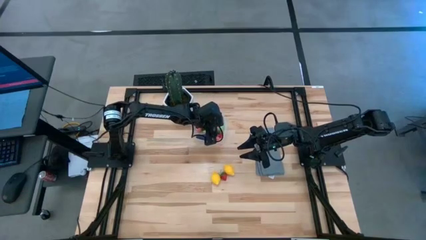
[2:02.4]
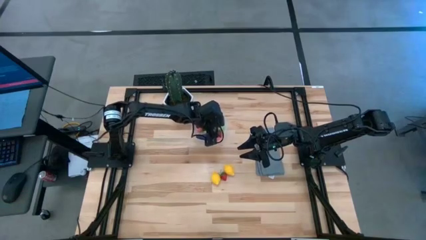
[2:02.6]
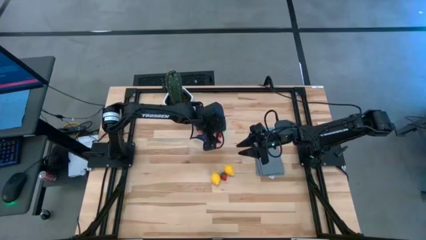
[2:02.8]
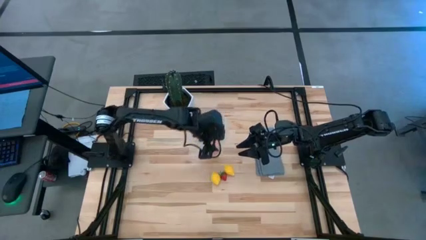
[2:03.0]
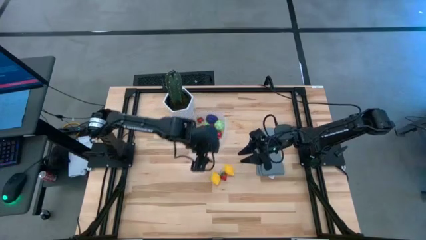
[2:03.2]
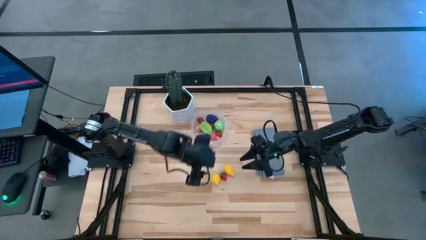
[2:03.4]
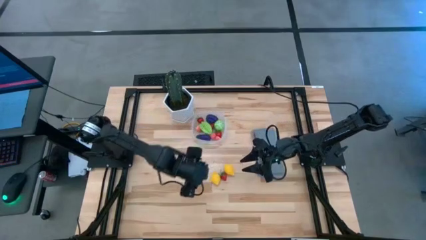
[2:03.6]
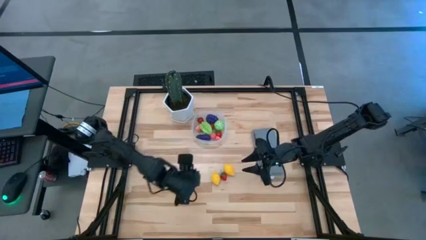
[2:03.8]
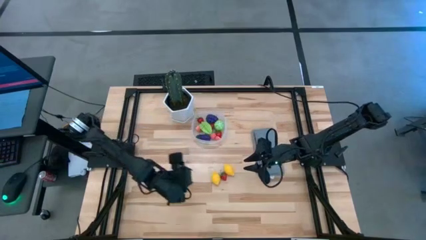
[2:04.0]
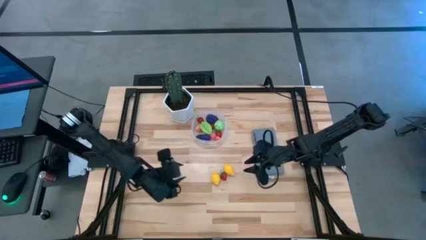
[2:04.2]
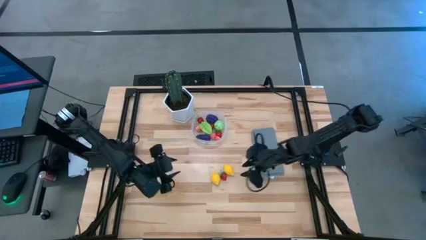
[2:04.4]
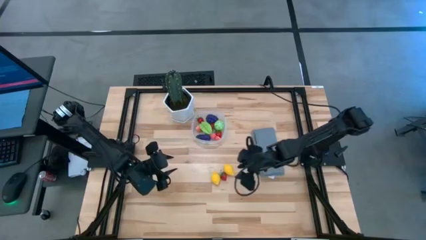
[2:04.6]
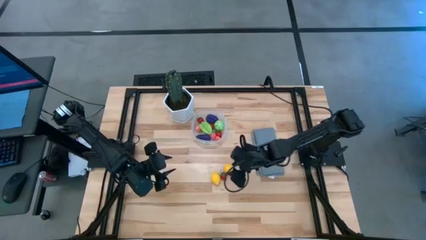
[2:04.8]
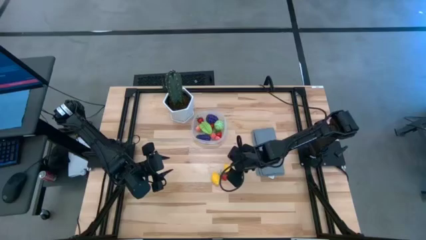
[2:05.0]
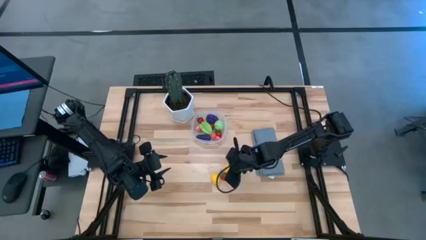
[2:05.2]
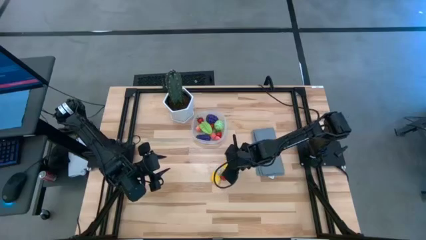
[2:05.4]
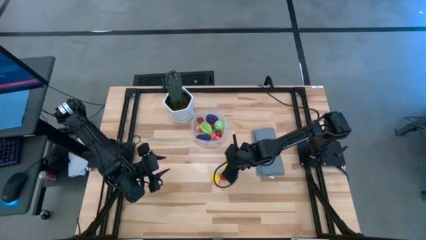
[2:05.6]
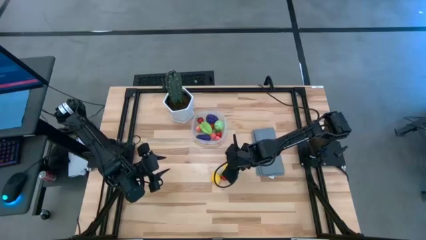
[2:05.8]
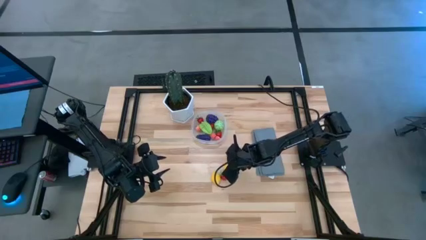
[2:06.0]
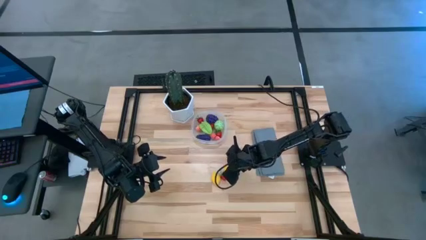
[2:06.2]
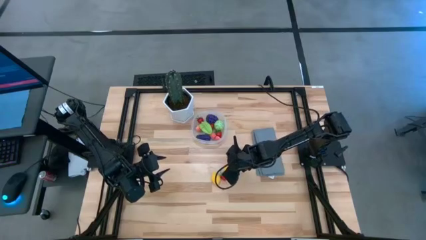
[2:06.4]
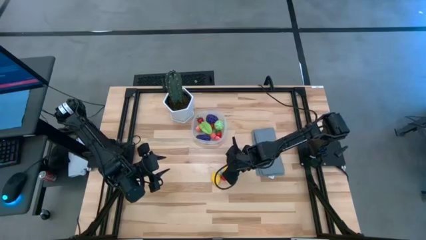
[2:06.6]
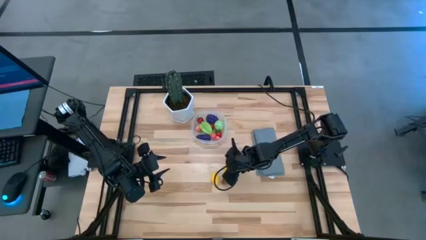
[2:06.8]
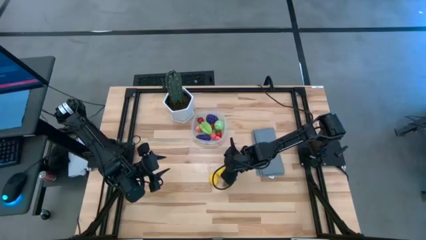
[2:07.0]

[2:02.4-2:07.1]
Task: Pick and placing Produce into tupperware
Put the right lemon into the transparent bin

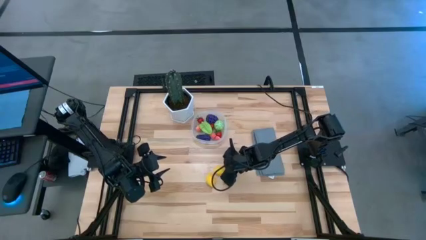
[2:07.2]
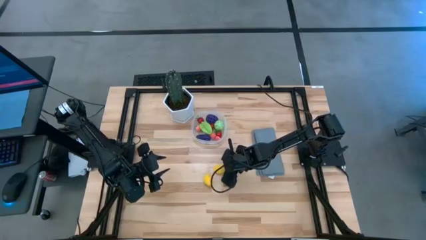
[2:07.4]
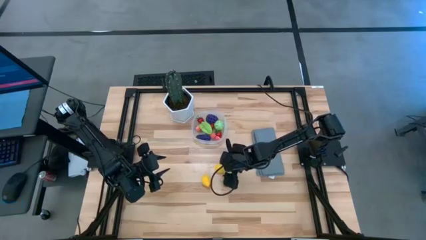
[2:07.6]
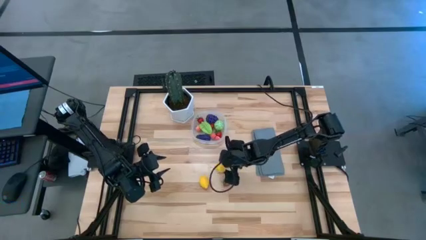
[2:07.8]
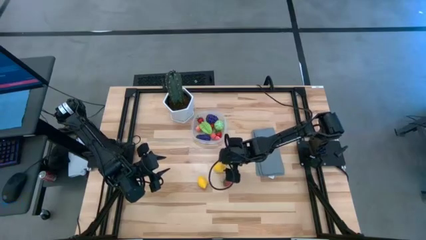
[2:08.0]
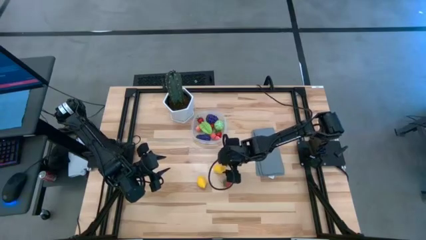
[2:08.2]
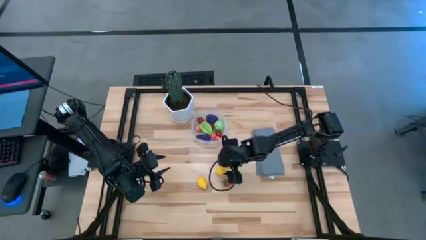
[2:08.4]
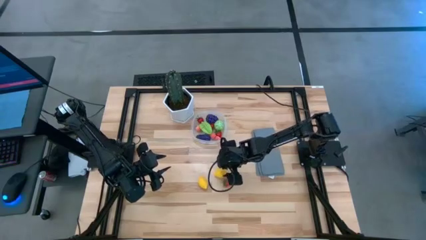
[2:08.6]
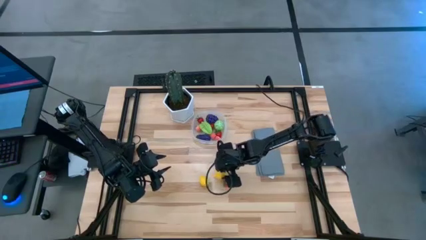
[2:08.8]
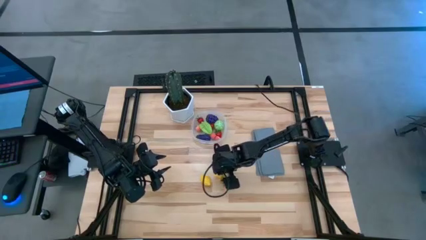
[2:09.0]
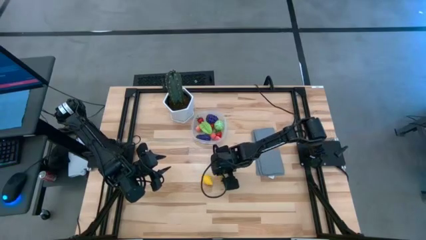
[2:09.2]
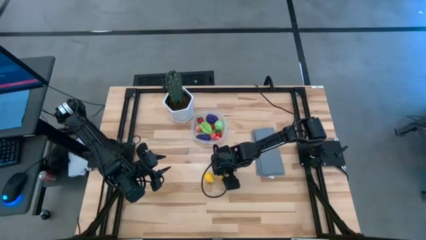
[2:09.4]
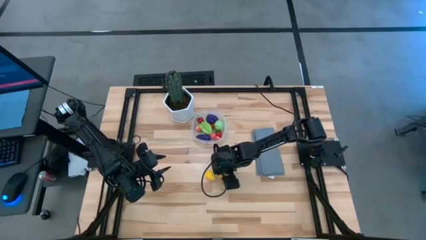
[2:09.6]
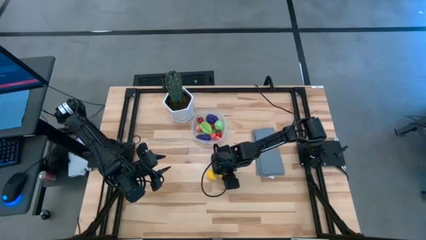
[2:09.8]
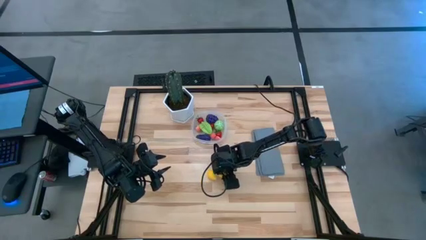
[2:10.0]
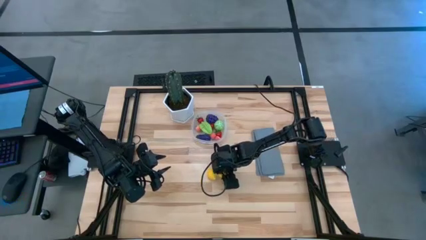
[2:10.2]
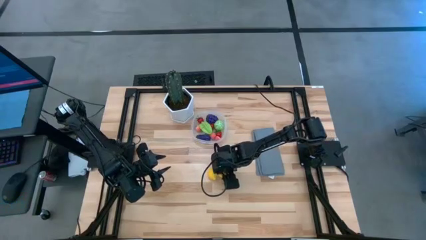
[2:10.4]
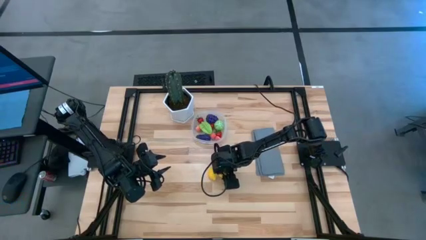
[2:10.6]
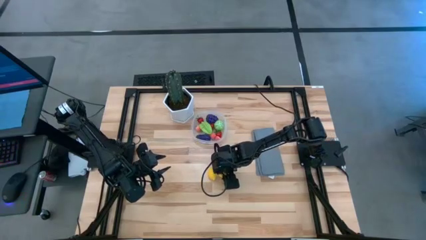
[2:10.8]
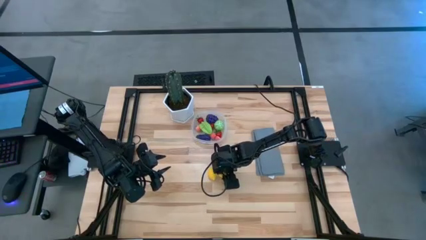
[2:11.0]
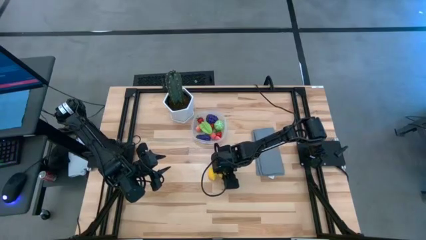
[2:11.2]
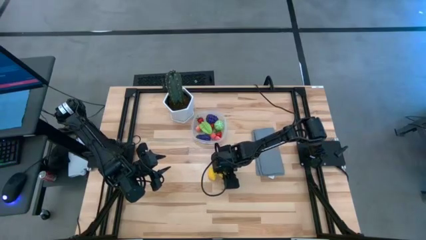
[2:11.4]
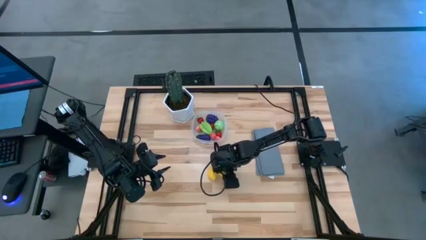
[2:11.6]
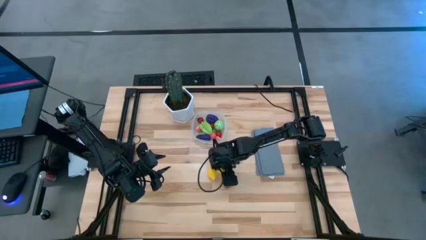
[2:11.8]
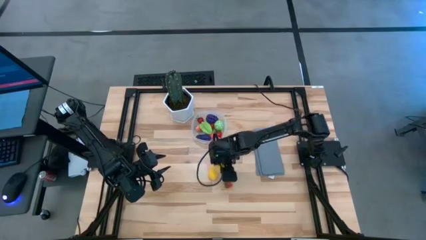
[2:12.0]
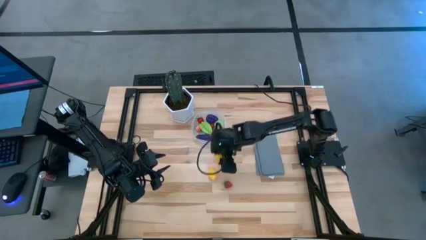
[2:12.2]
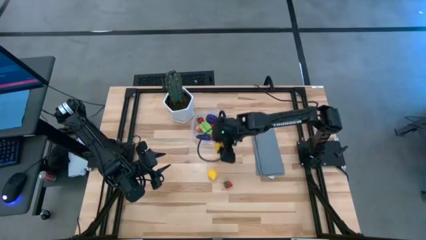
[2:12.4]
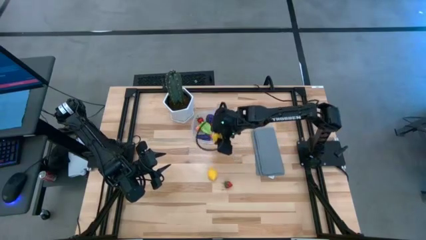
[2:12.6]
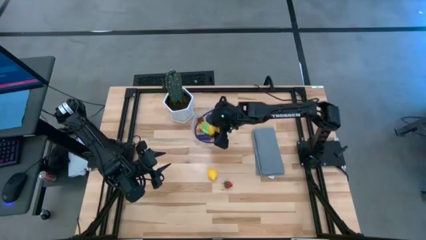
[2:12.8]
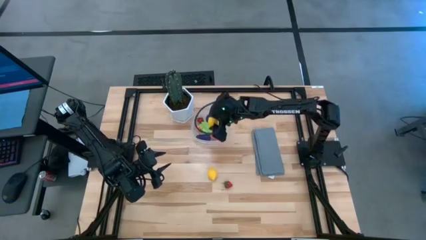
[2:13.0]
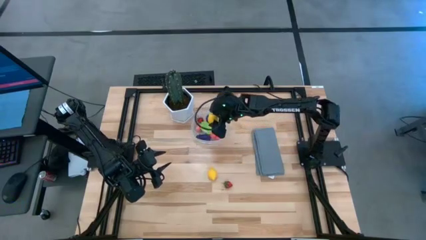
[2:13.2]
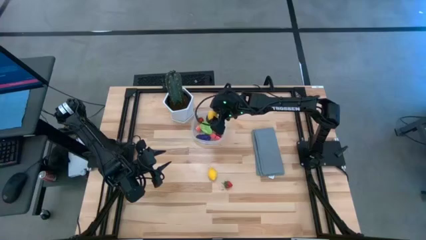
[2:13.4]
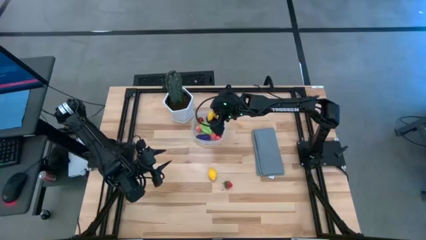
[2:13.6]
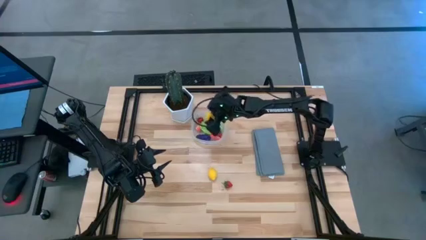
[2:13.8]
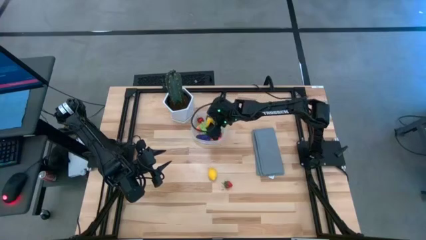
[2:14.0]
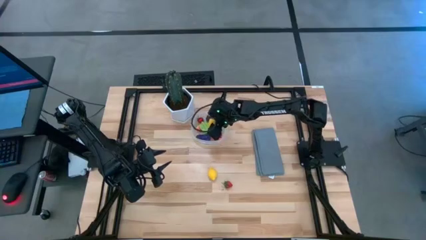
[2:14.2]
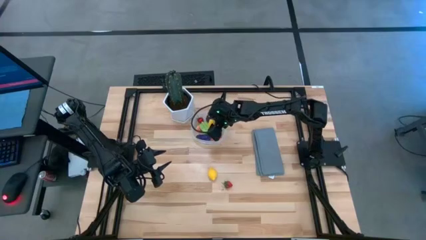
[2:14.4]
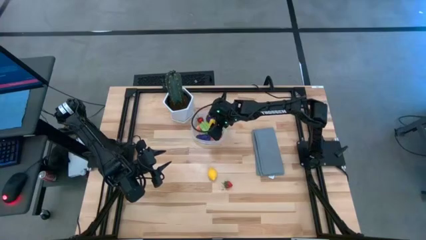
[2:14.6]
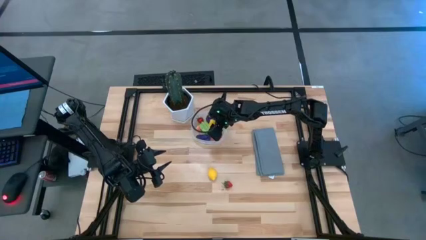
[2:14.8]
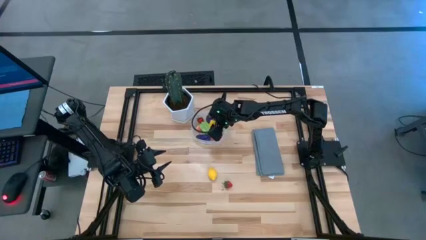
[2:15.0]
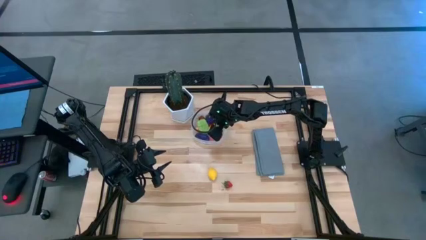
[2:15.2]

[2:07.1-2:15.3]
Put the right lemon into the transparent bin

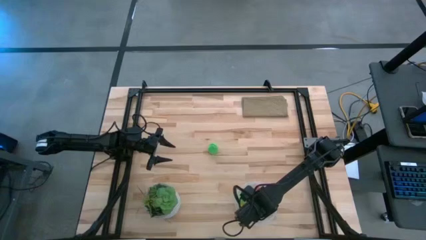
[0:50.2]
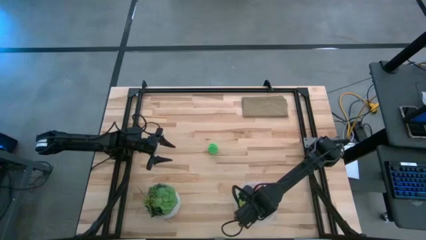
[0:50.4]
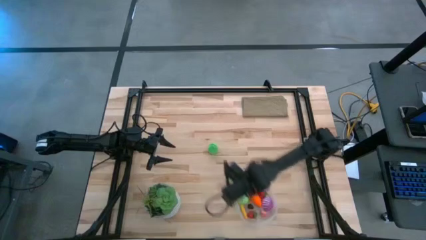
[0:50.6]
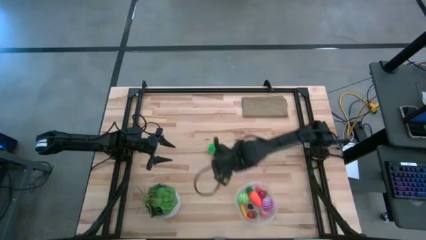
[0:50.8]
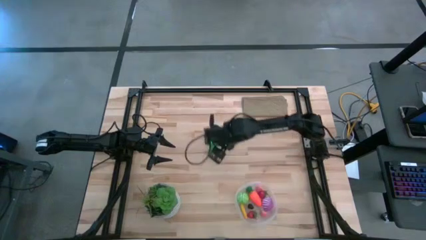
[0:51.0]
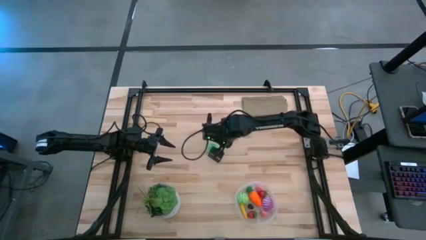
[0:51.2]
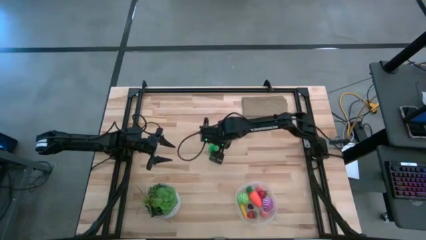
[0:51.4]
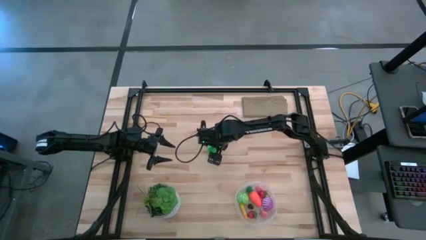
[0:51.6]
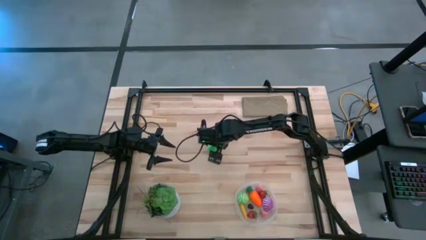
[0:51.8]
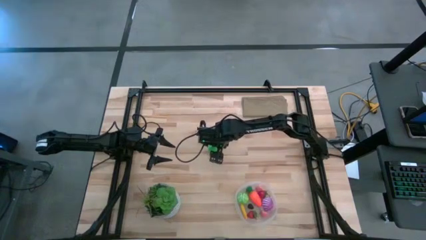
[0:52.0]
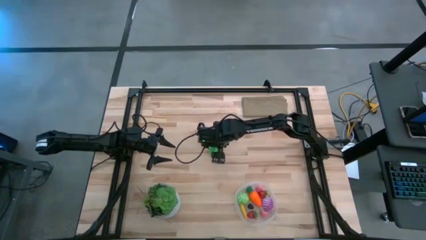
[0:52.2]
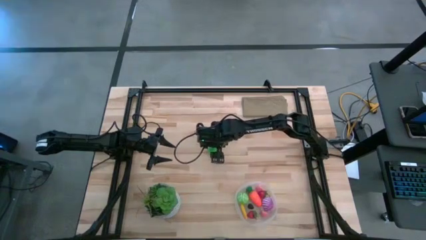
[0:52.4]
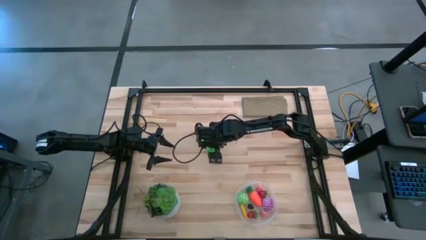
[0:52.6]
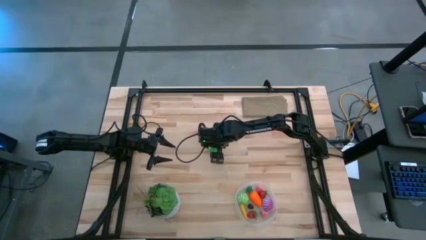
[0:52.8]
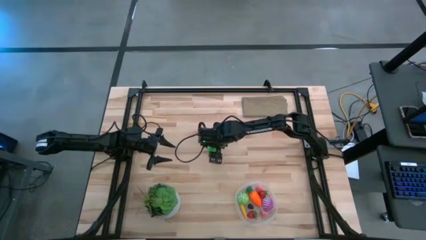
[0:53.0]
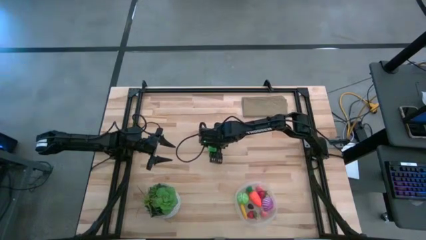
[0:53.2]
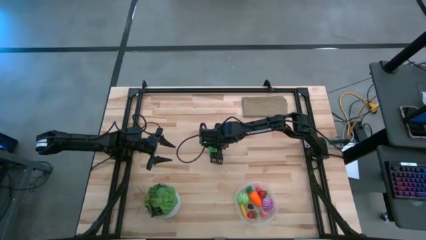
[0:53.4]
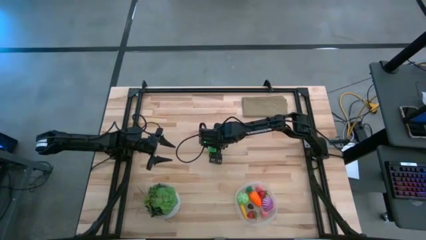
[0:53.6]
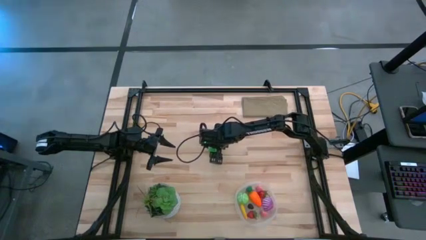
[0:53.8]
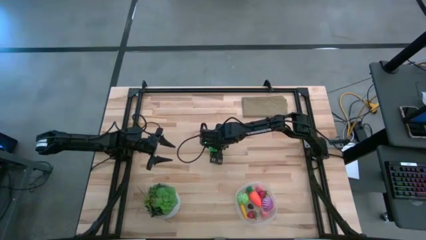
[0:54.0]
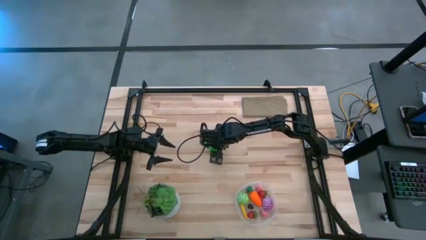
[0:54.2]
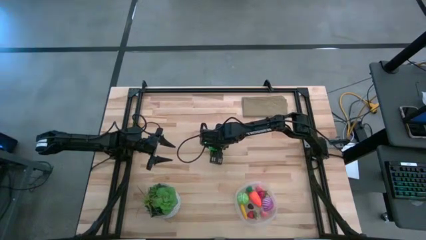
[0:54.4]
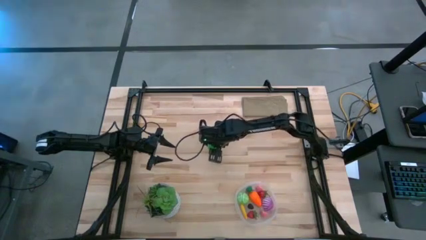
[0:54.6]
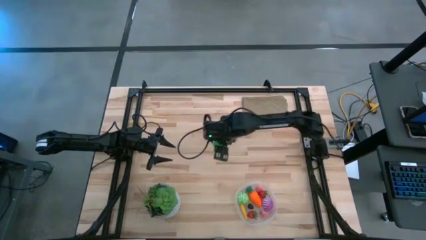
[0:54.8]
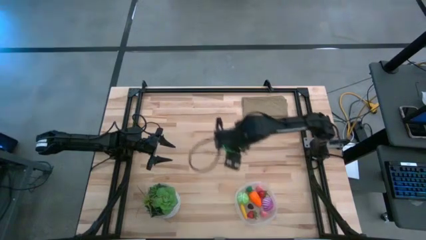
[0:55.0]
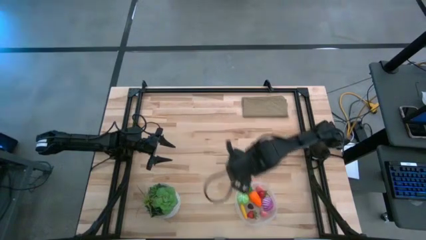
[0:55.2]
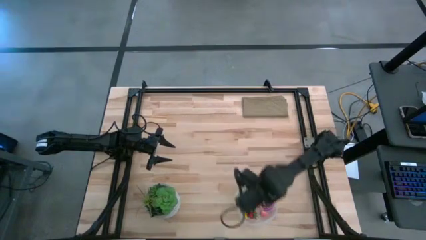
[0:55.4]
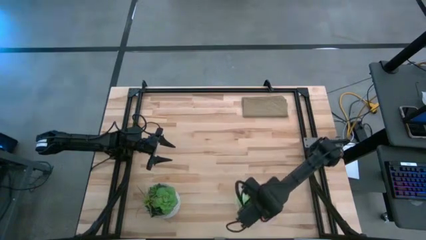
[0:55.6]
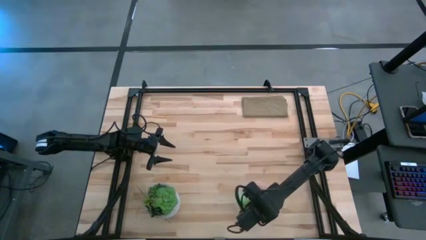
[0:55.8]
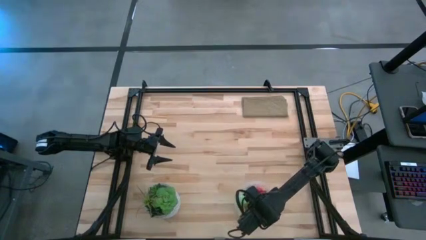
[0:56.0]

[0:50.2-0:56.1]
Task: Pick and placing Produce into tupperware
Put the green pear into the transparent container
